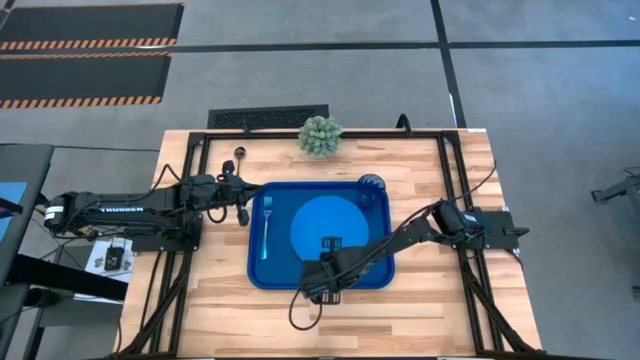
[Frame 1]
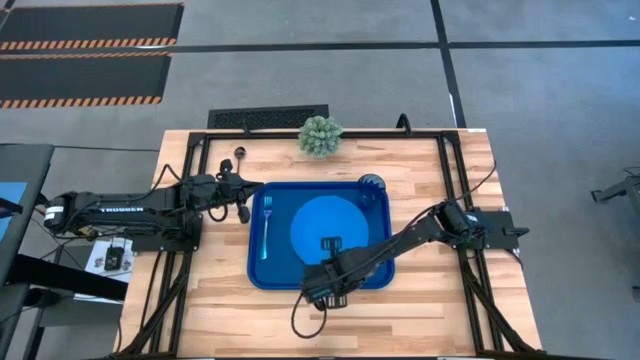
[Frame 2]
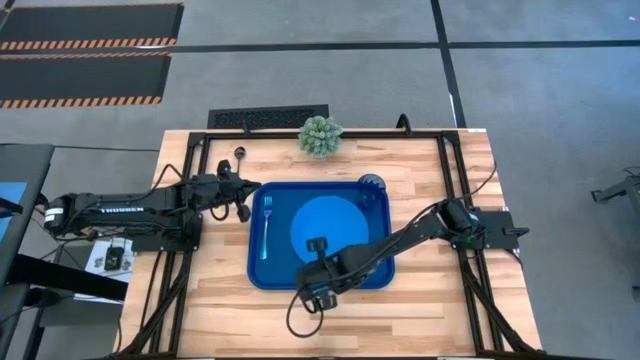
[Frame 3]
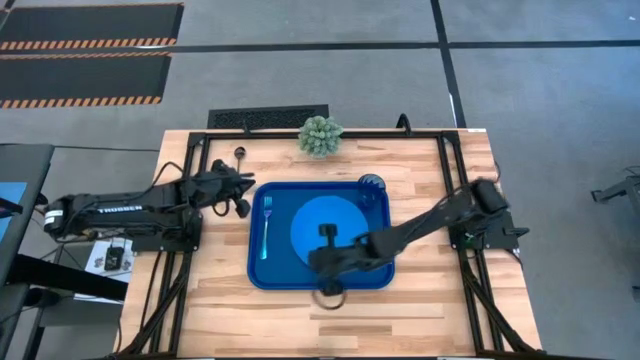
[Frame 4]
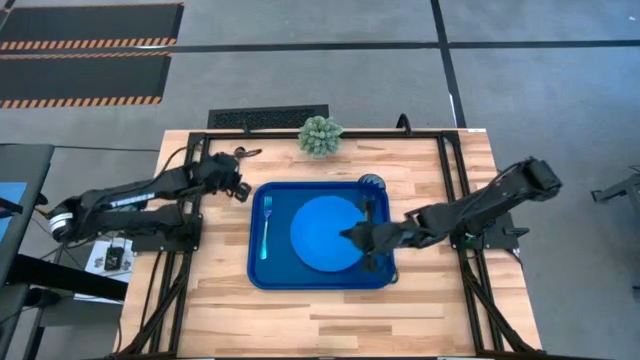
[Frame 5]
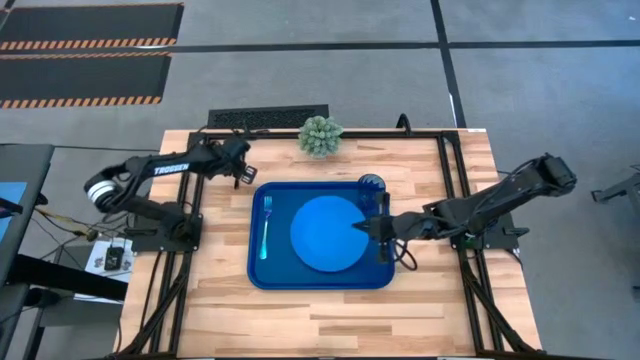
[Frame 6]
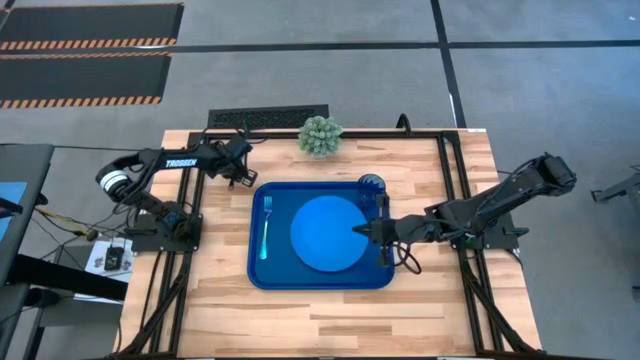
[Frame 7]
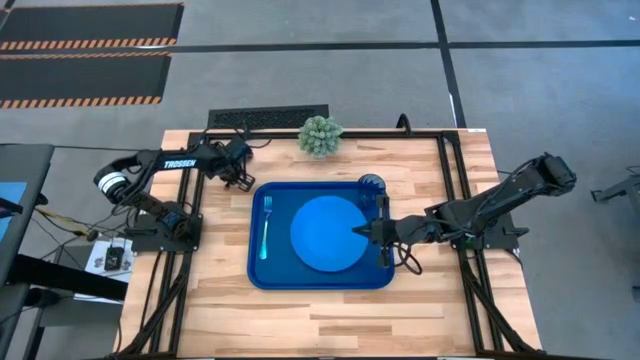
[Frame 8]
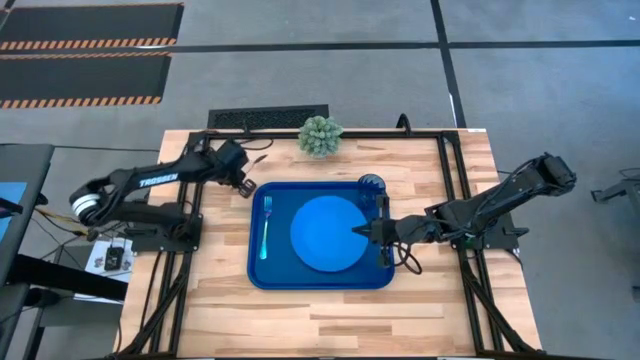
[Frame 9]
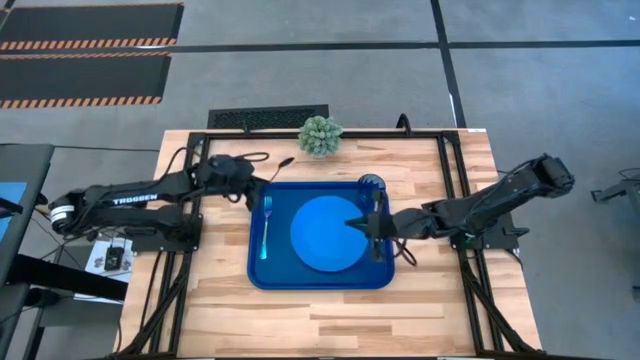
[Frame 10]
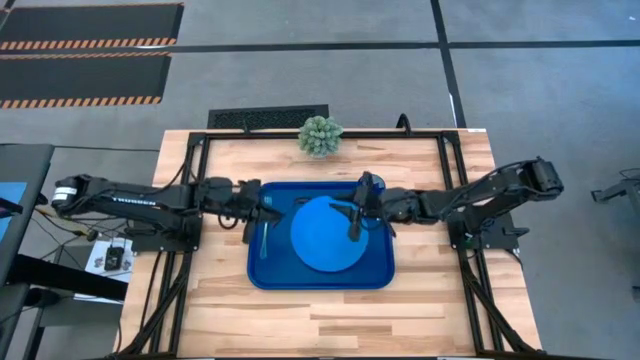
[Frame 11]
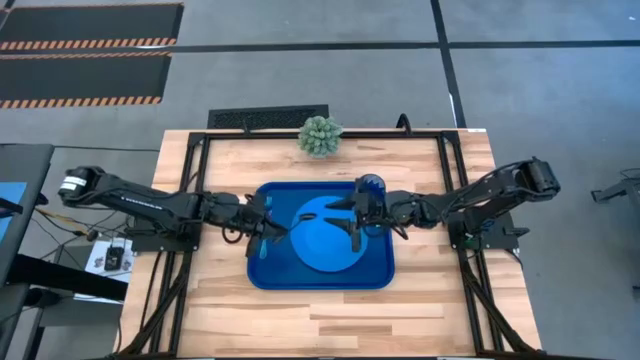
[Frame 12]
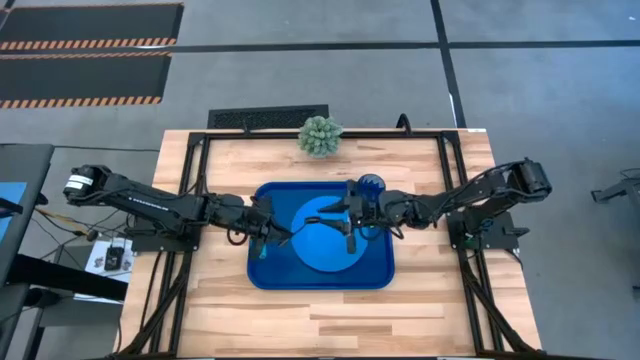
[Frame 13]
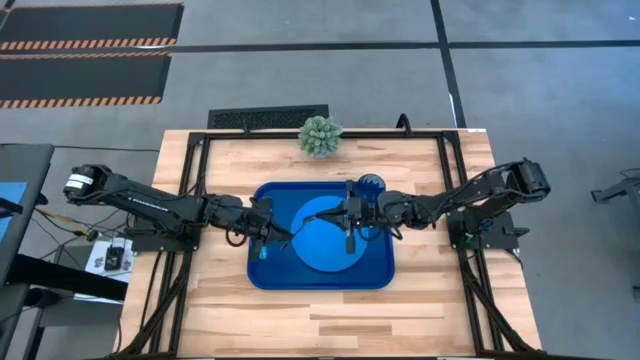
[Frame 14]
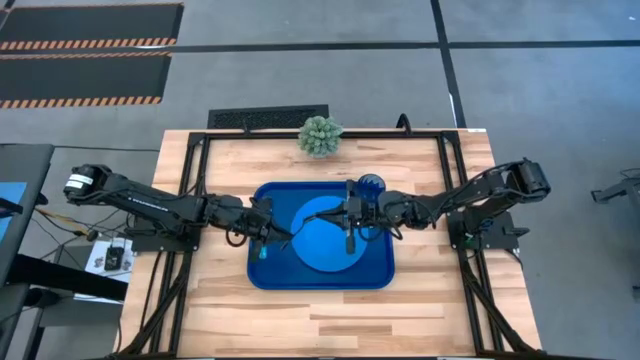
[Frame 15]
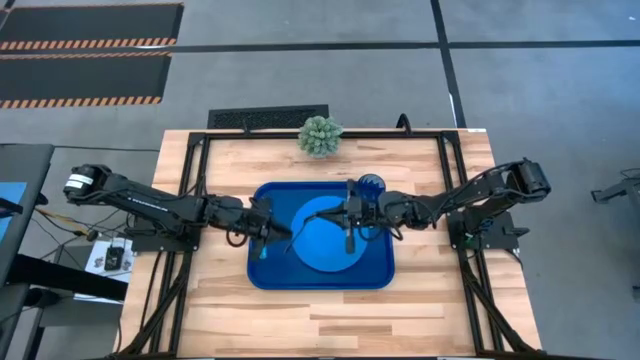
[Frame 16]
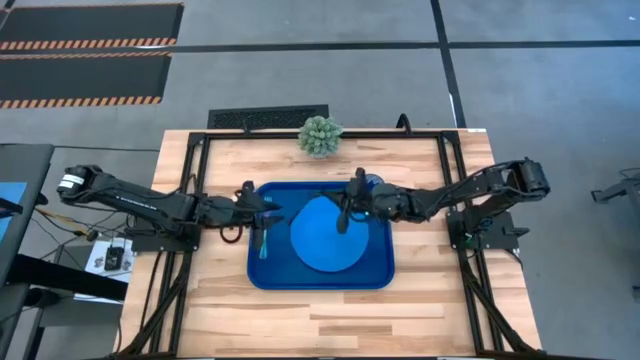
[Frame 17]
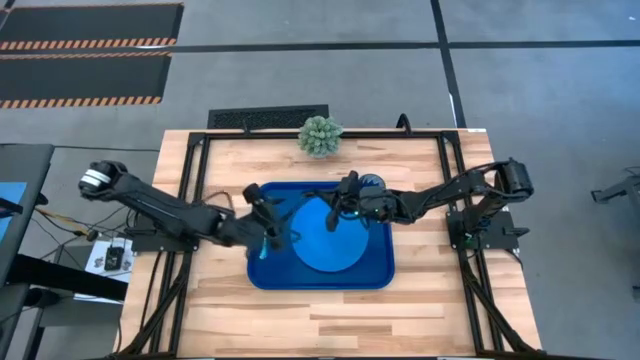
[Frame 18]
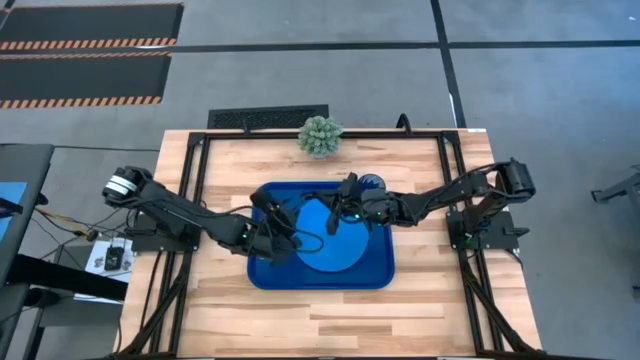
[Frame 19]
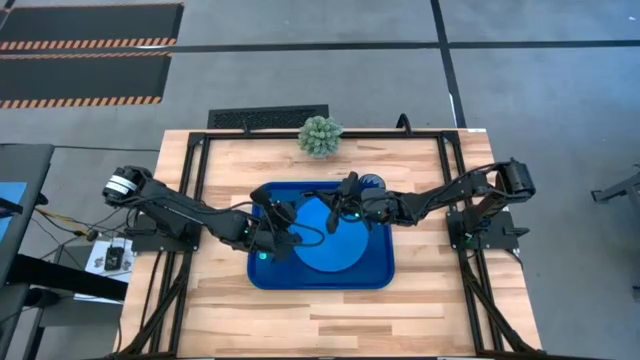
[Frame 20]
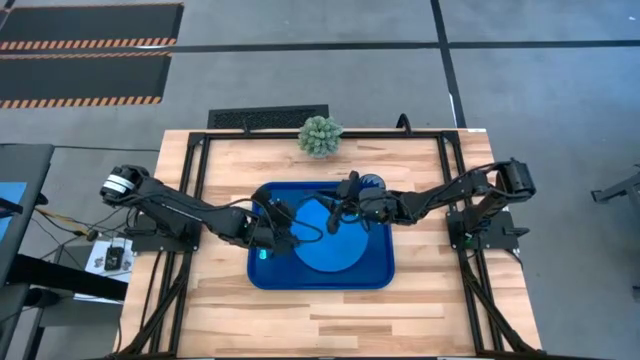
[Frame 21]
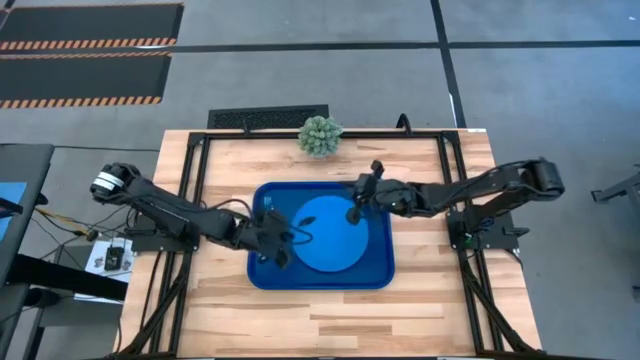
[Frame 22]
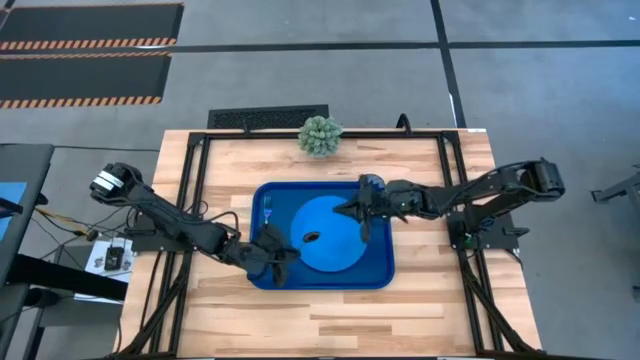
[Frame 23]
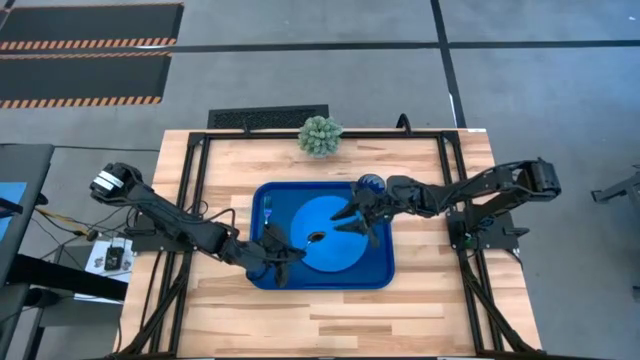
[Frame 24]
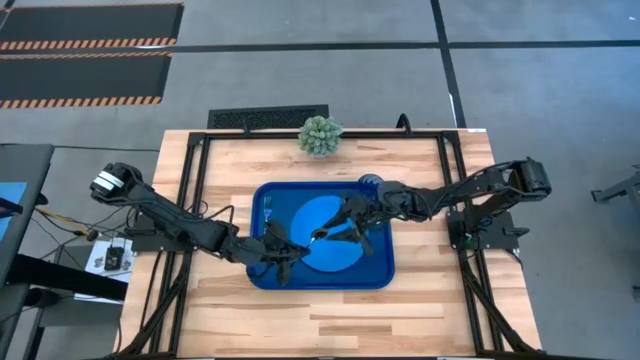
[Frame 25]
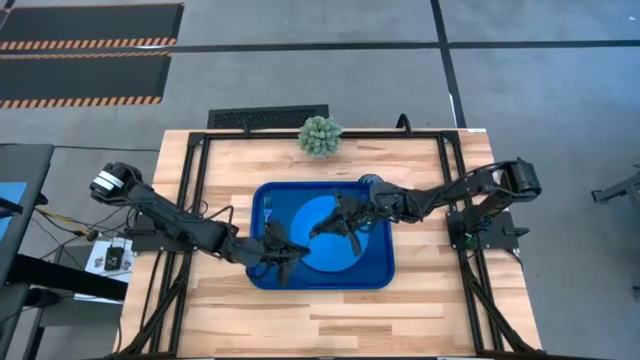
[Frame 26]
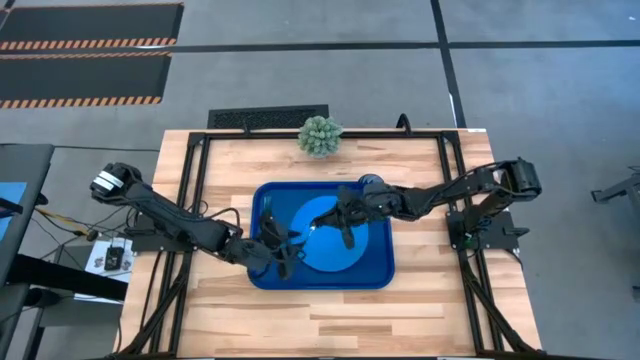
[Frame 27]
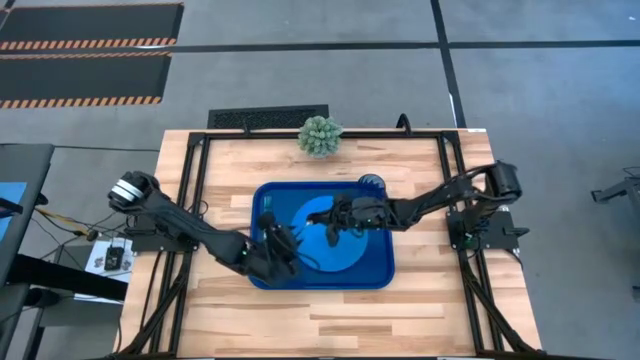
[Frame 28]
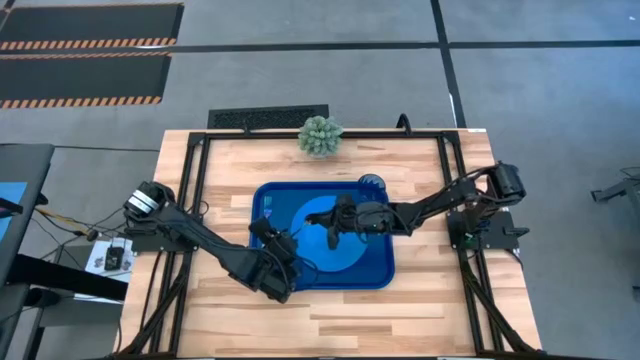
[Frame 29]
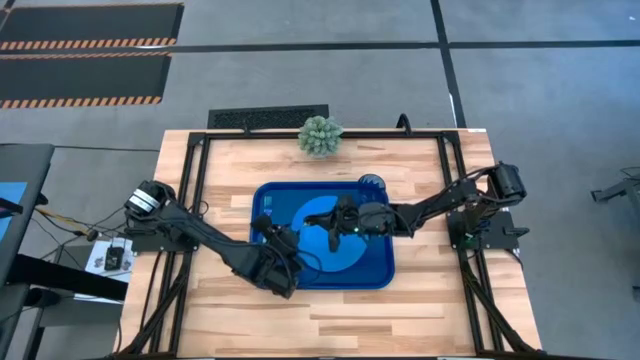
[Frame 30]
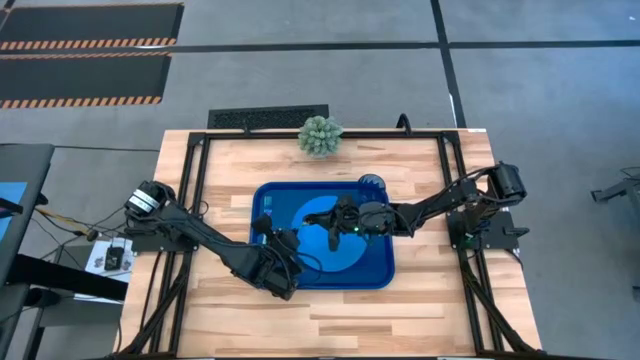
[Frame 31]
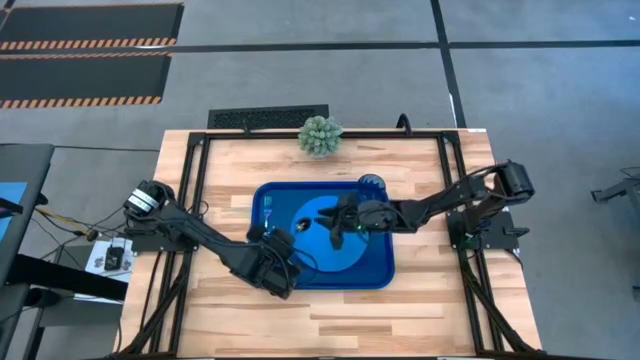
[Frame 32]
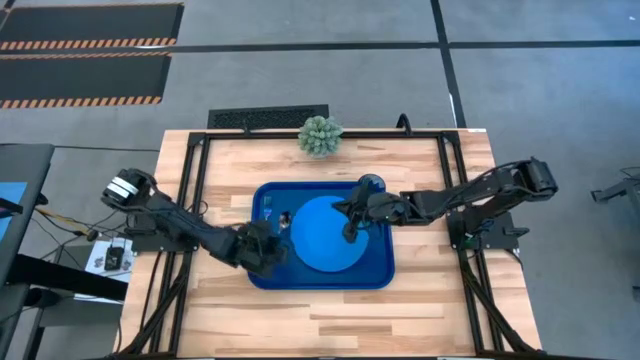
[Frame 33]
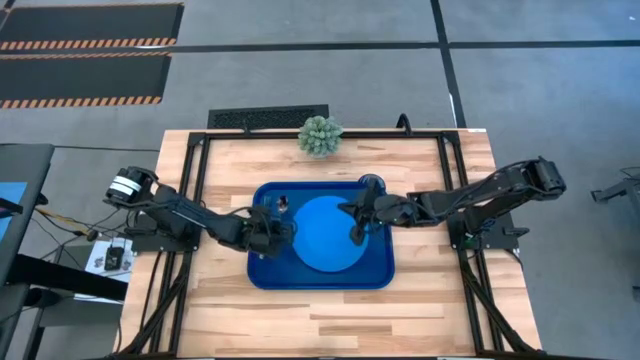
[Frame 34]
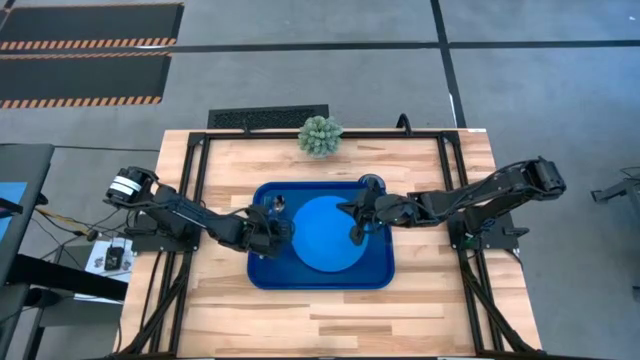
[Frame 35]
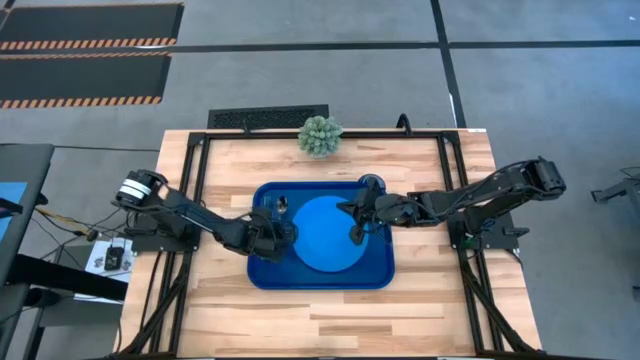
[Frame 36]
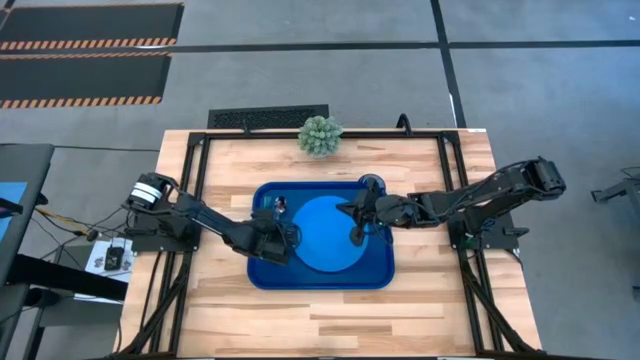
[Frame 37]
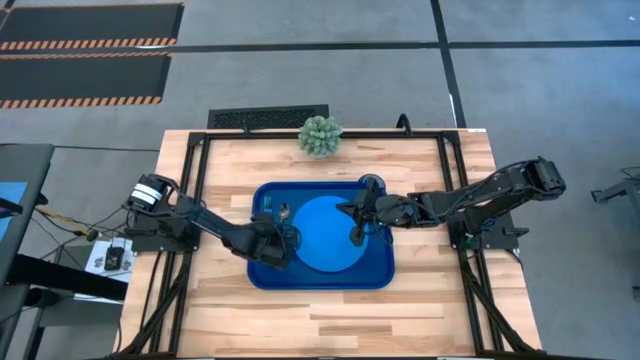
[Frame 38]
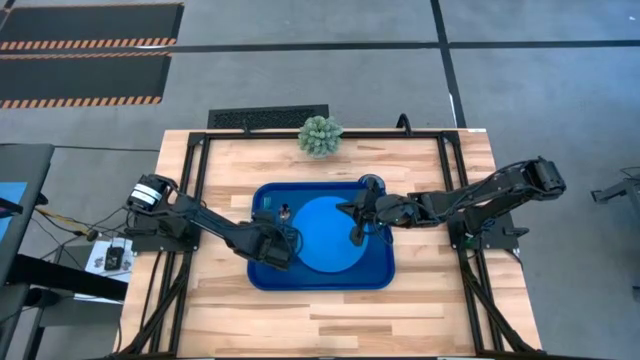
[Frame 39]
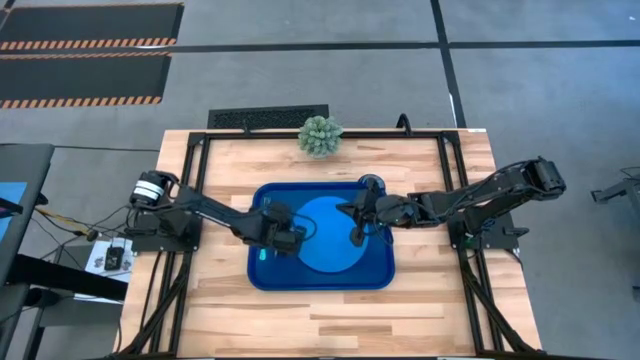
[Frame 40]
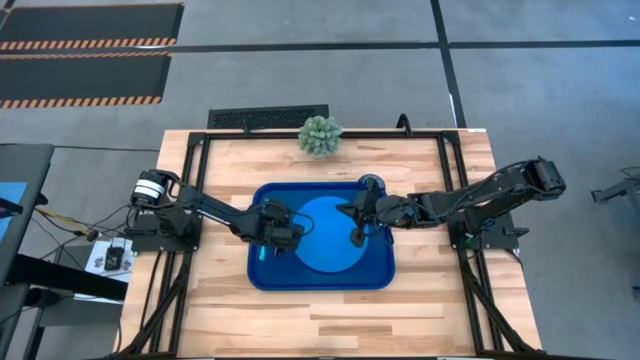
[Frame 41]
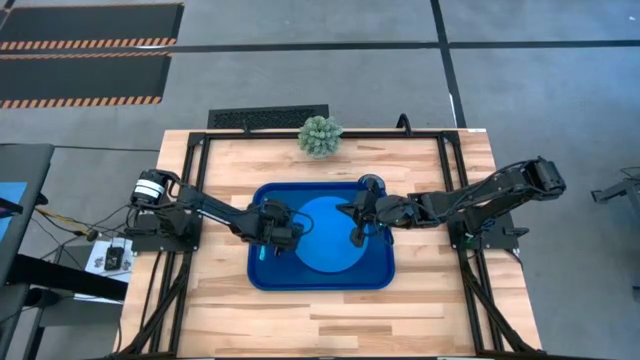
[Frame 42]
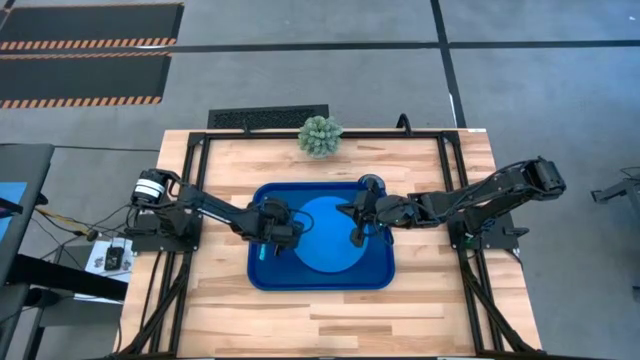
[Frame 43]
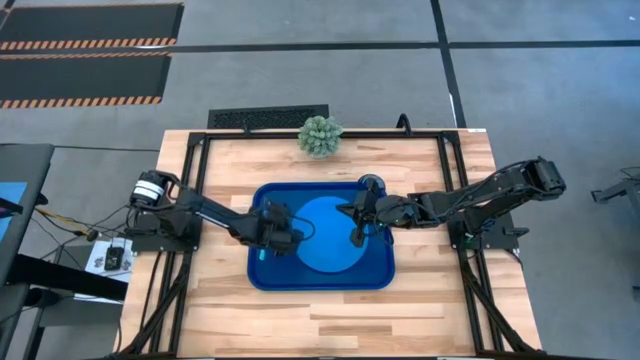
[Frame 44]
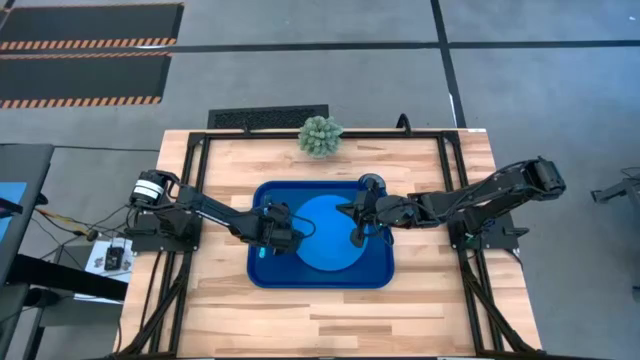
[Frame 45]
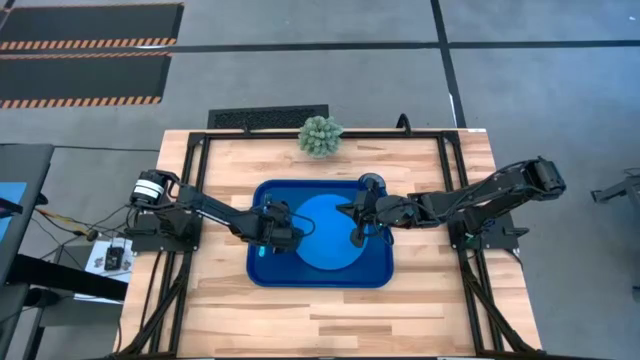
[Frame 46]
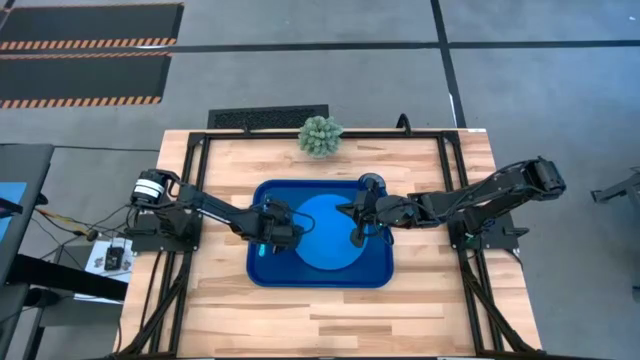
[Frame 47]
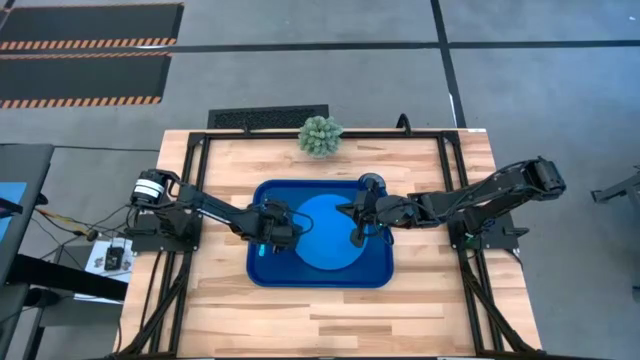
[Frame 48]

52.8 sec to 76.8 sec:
Task: Pick and place plate/cup/fork/spoon on tray
Put the spoon between the fork and the blue plate on the blue serving tray
